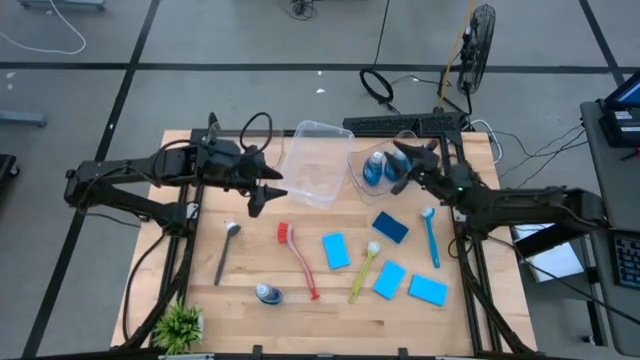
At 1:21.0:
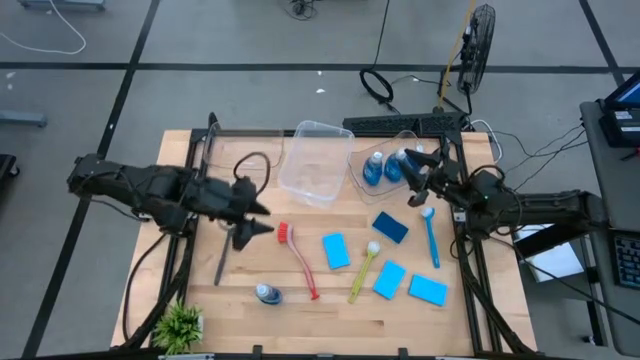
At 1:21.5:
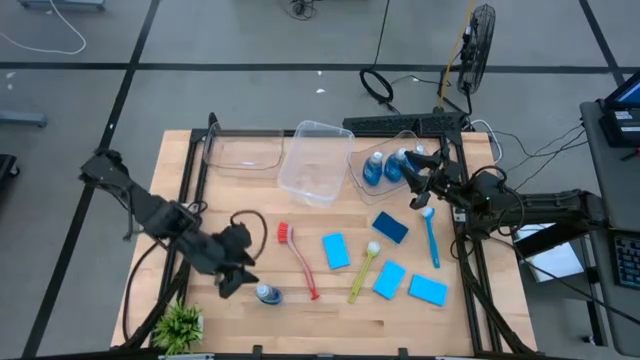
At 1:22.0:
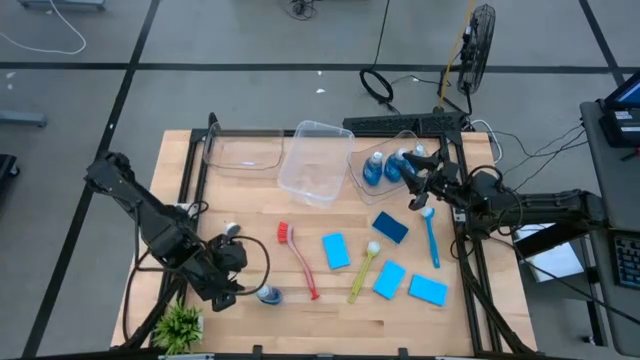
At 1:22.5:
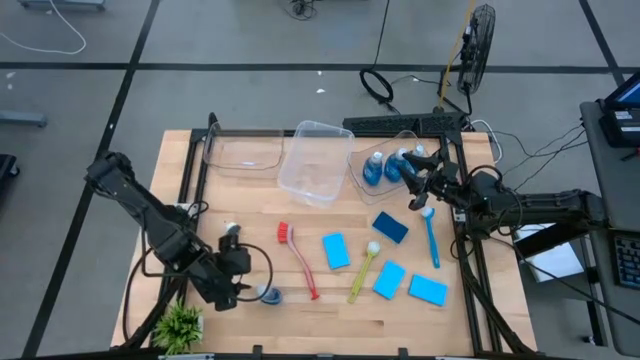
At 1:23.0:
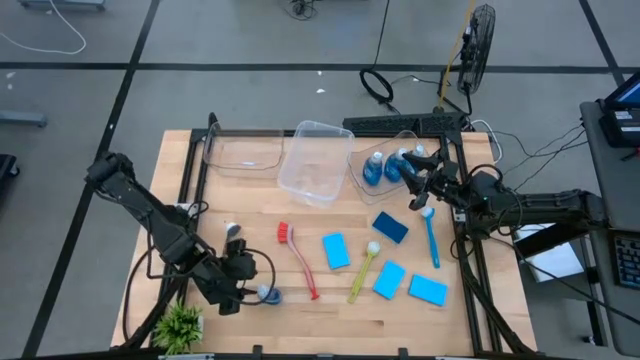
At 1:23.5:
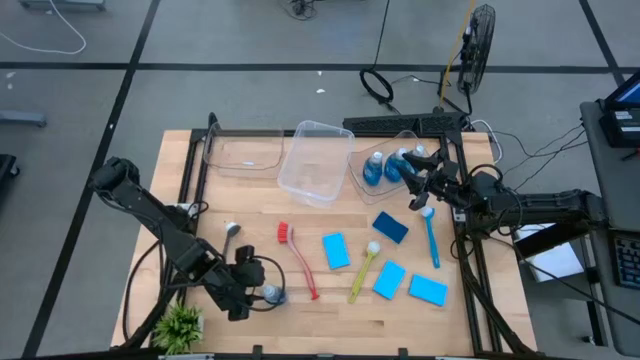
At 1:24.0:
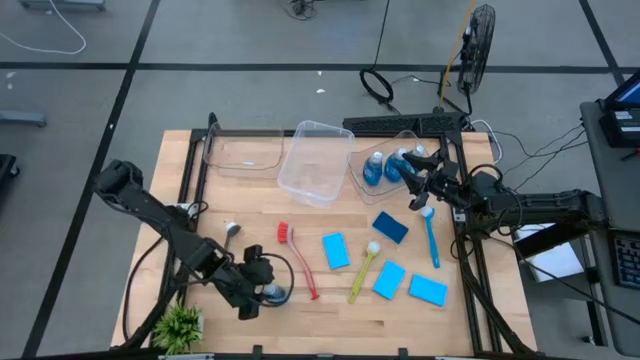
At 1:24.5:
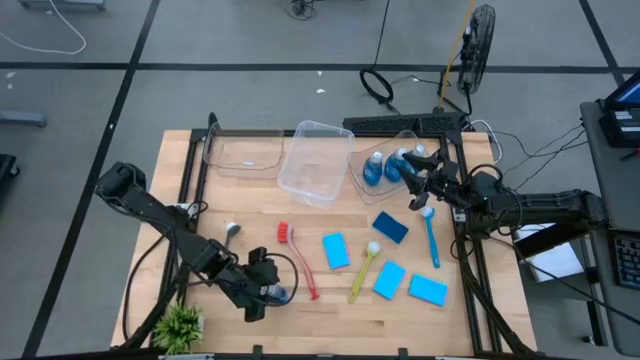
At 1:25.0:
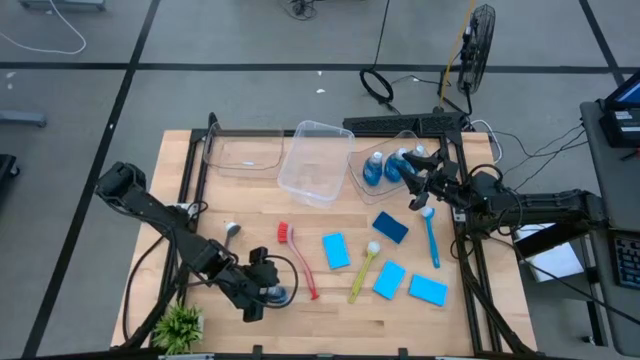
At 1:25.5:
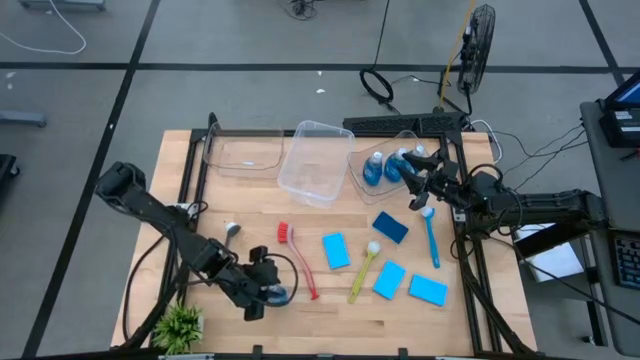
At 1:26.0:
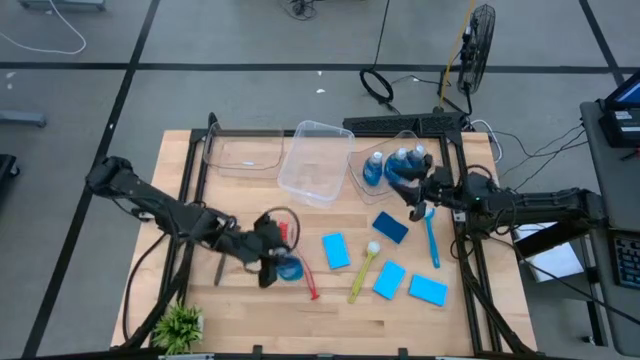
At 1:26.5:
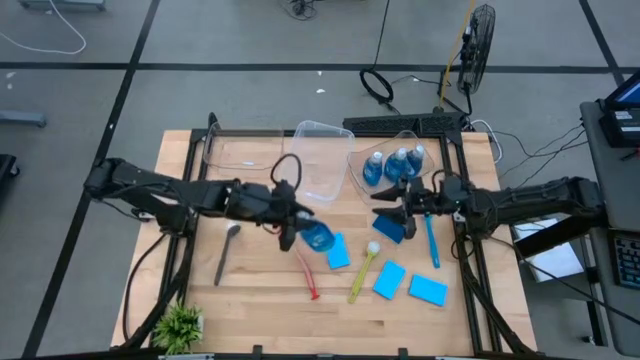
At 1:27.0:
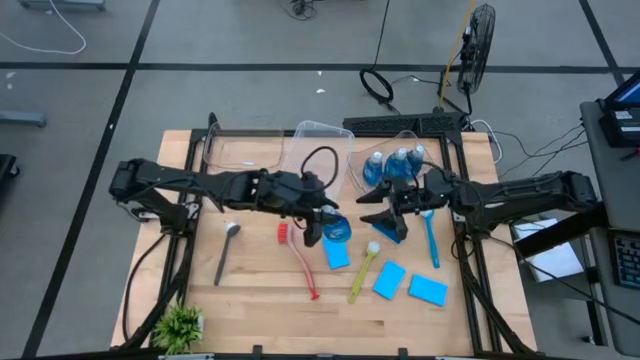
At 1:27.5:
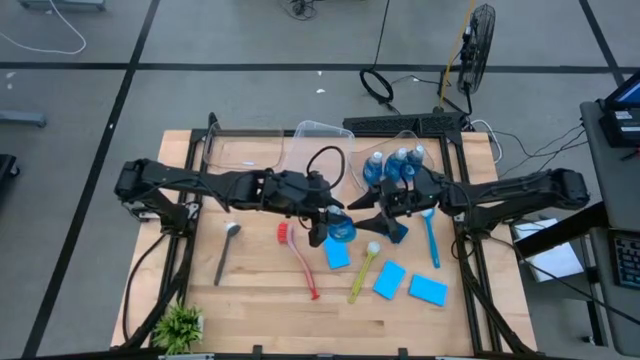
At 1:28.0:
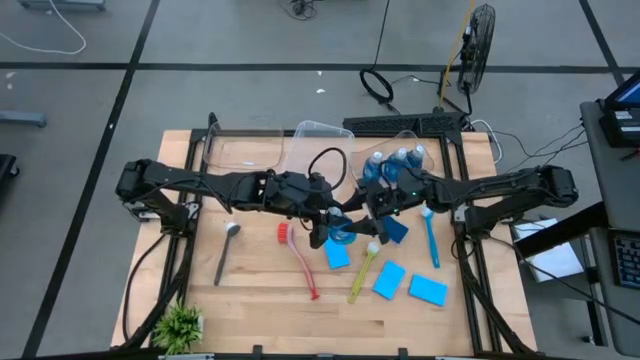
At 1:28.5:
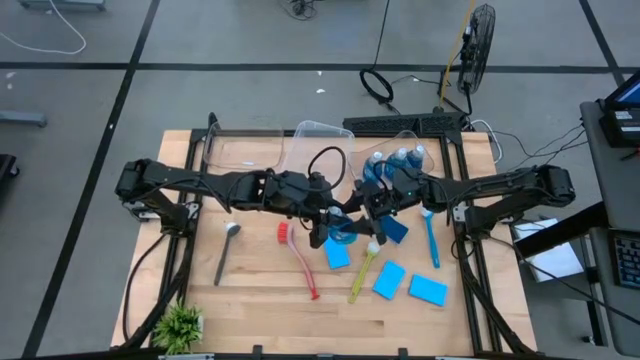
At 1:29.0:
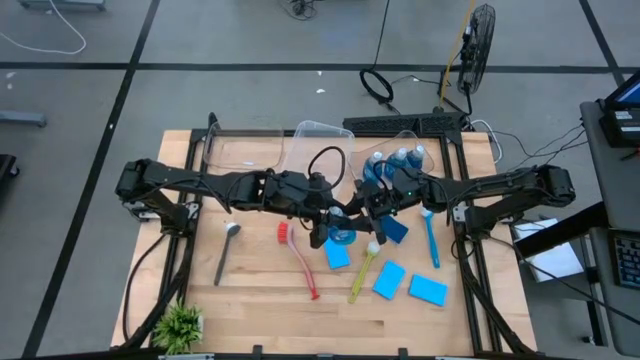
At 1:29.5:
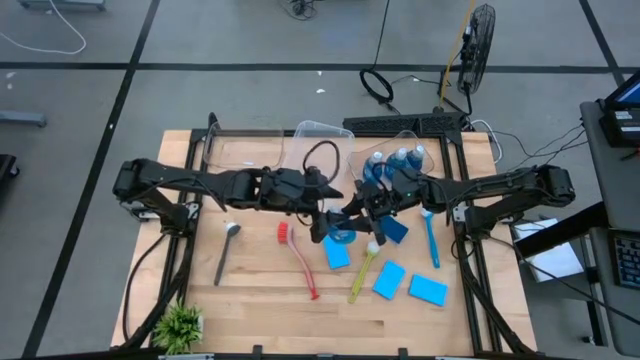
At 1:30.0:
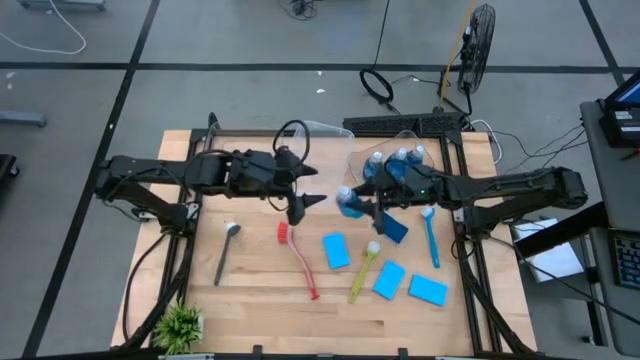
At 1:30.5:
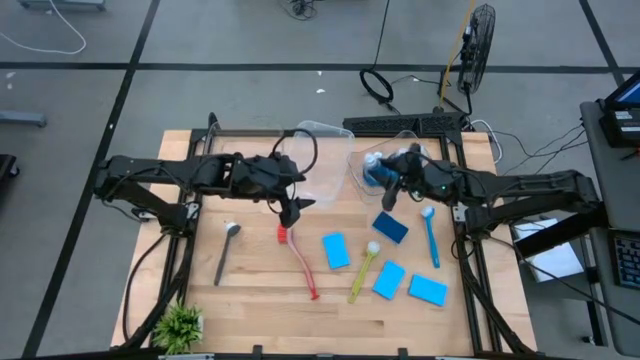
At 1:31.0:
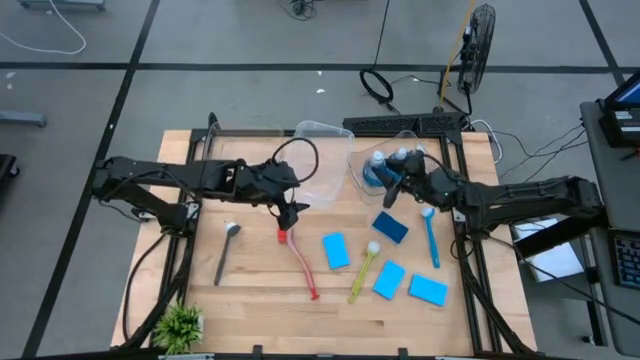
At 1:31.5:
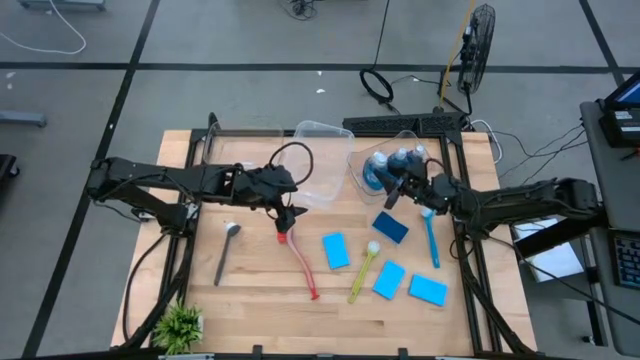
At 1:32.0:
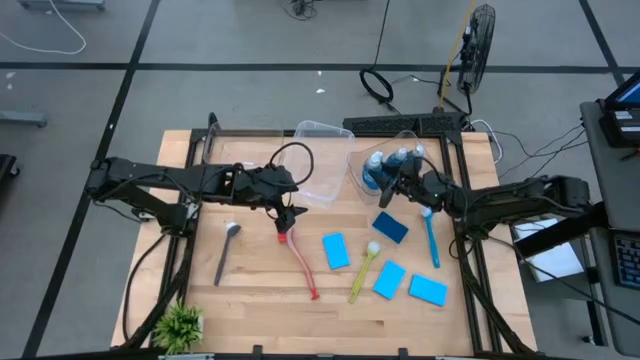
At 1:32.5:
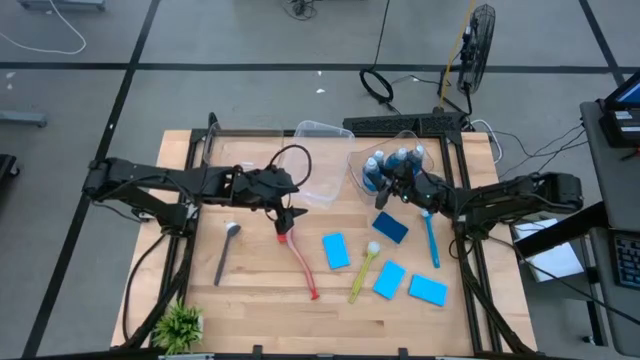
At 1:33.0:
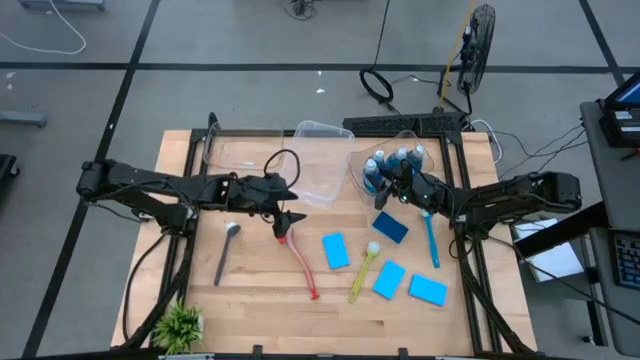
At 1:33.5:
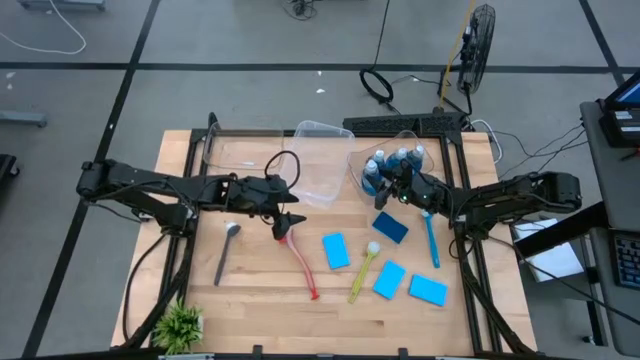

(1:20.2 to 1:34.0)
Task: Pick & Place Kitchen Sink Supplies
Put the blue dish soap into the right transparent bin

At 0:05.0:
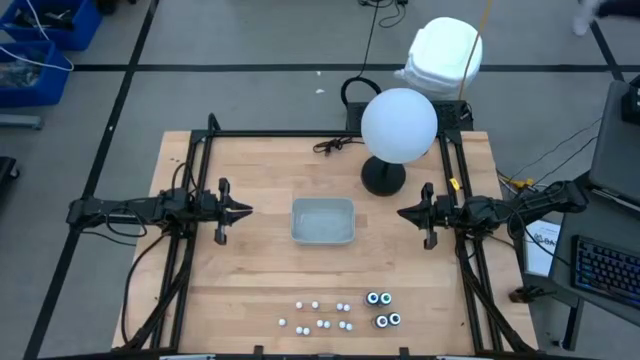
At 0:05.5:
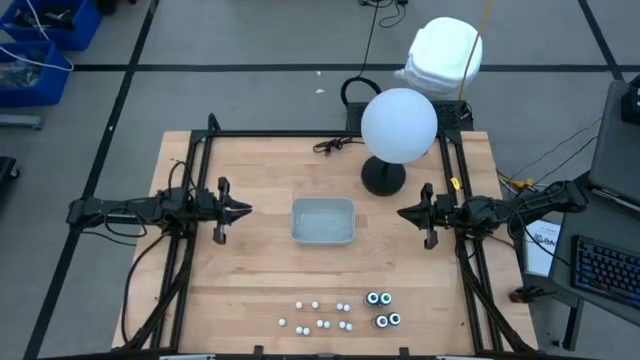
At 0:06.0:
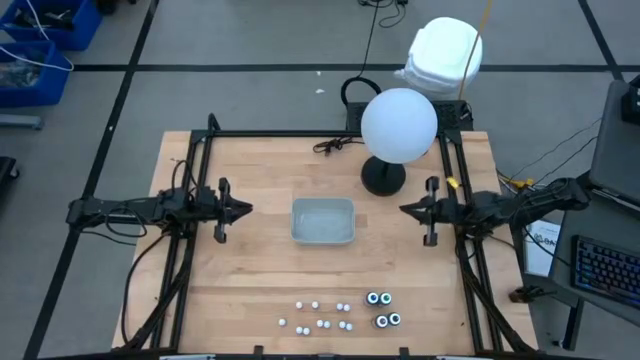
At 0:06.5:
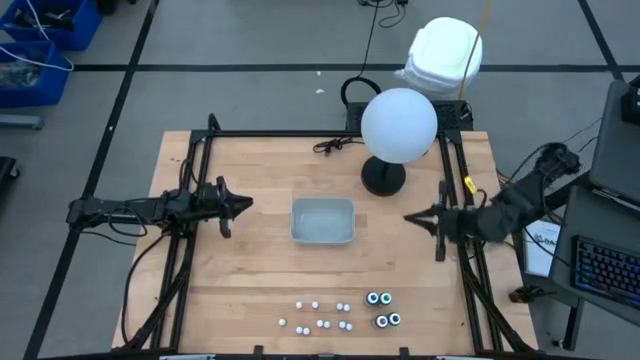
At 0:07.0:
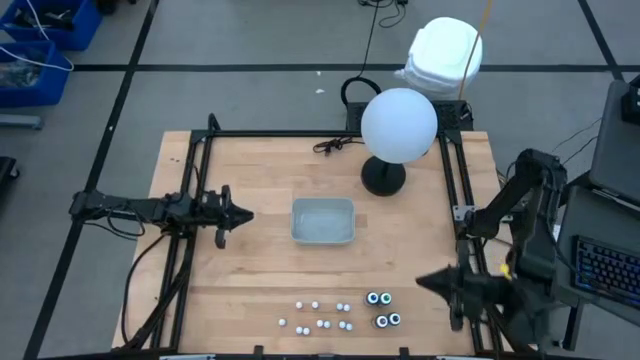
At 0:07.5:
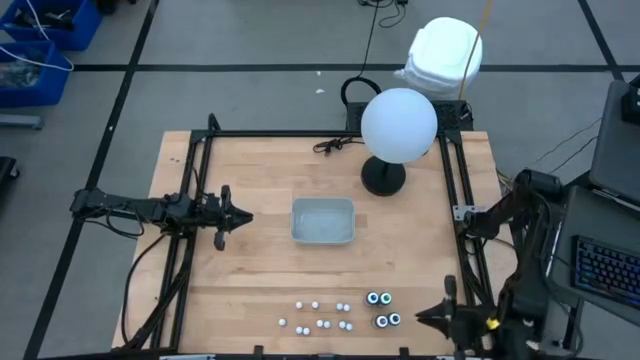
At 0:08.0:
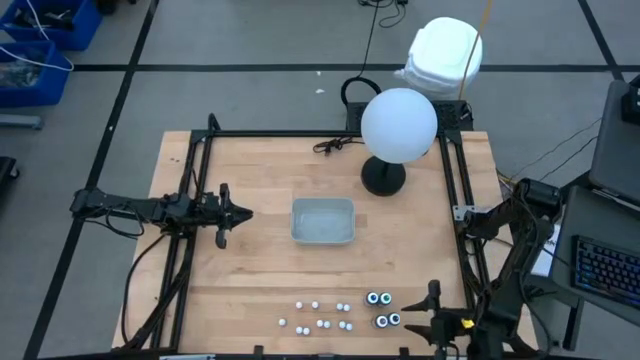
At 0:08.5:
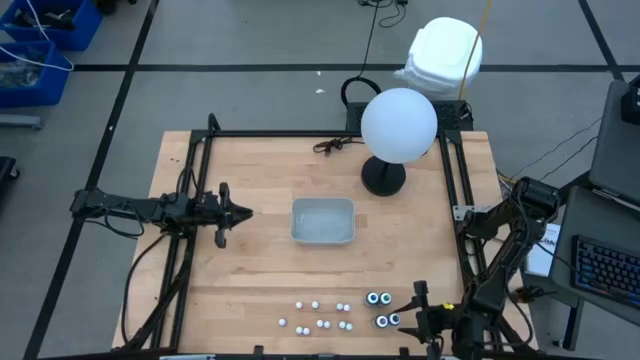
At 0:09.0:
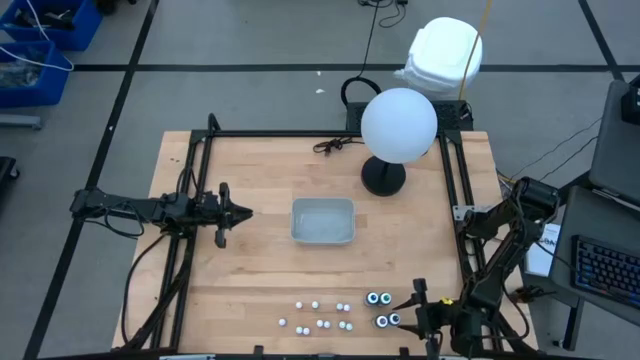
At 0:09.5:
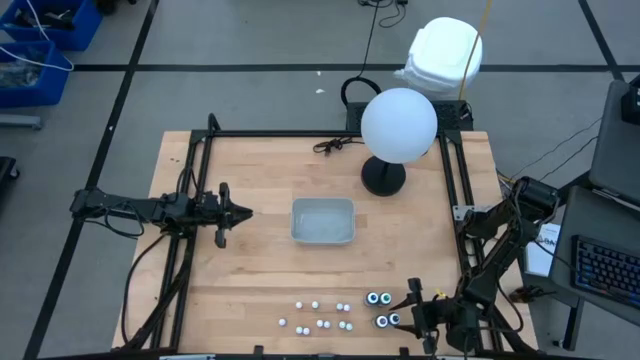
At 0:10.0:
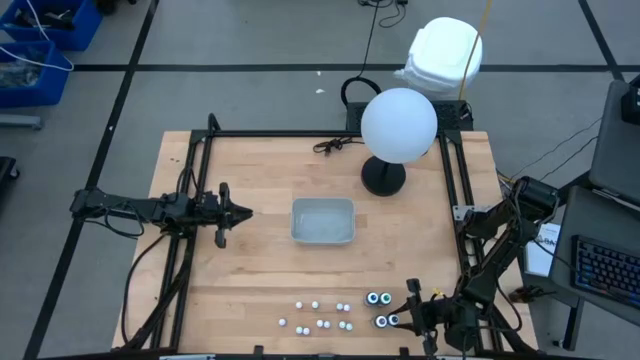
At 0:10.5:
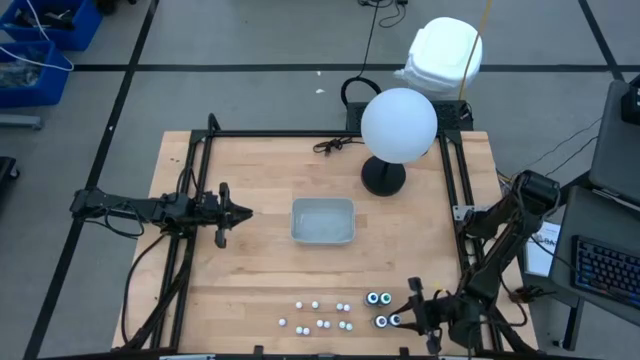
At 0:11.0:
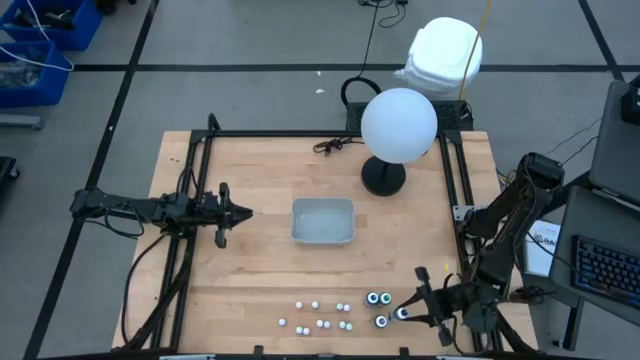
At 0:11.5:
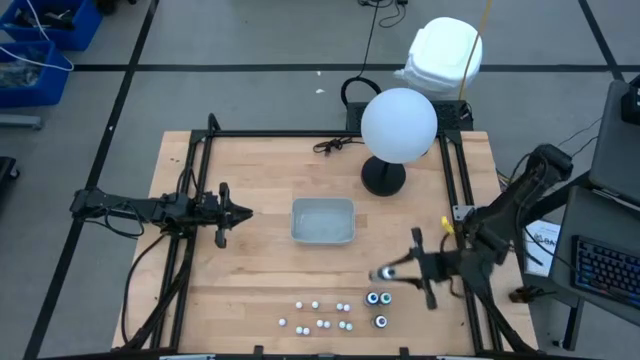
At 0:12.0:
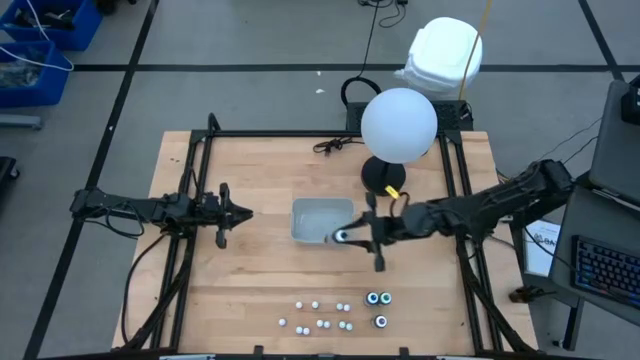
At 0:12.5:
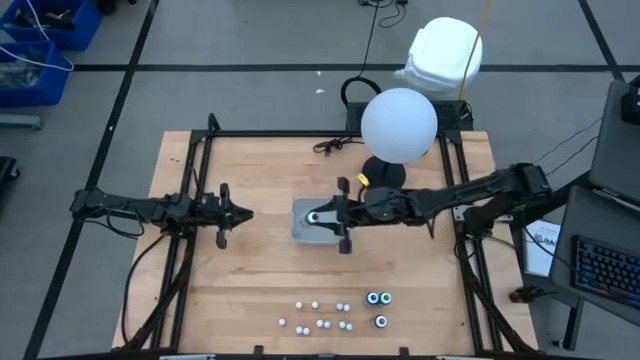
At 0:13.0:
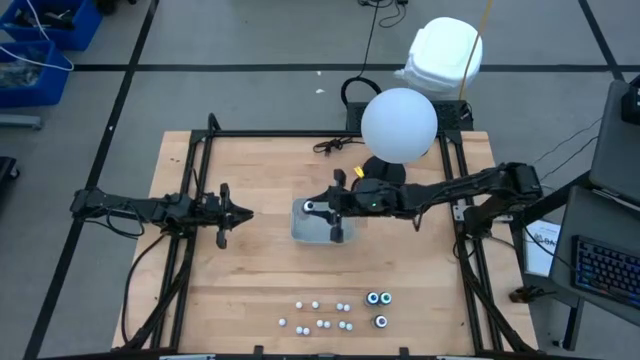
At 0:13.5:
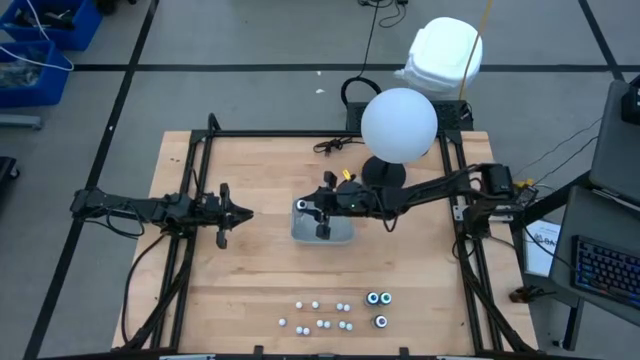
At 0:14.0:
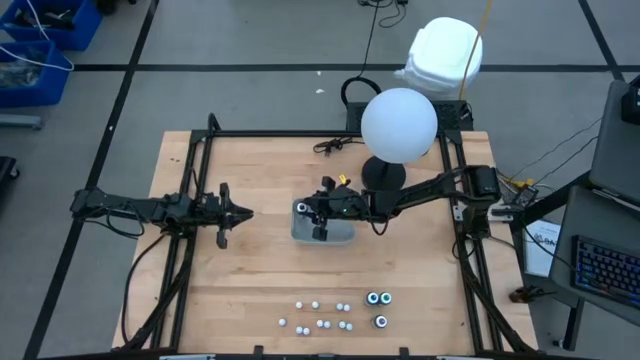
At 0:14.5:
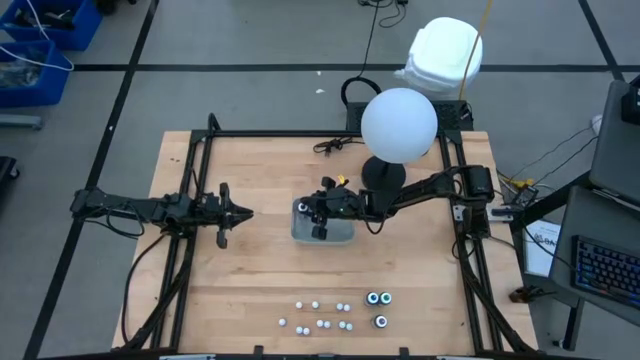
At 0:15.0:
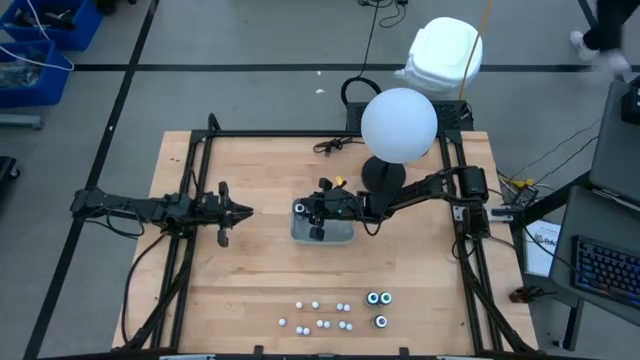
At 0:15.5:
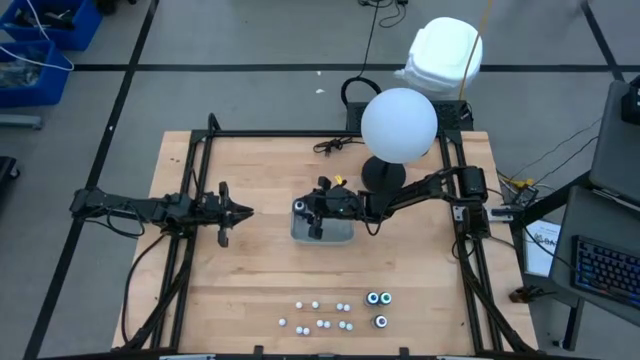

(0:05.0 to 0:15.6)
Task: Pick & Place food coloring
Put the big black food coloring bottle into the gray bin
